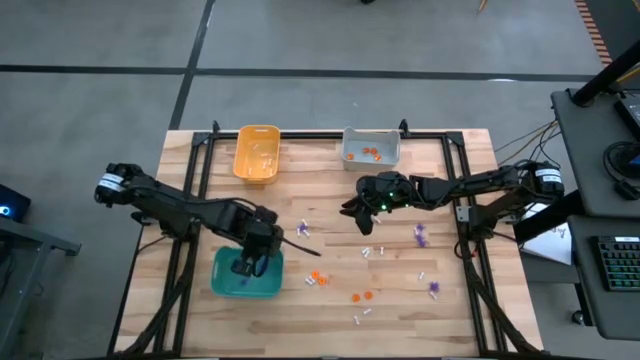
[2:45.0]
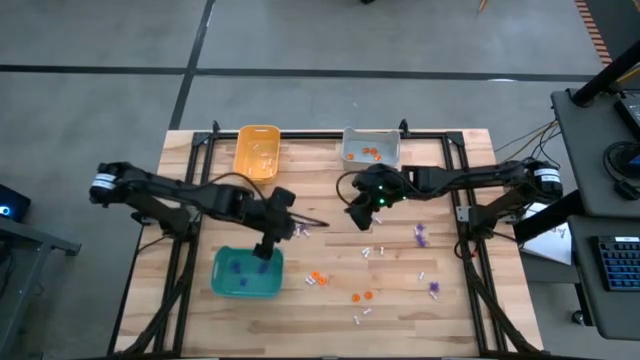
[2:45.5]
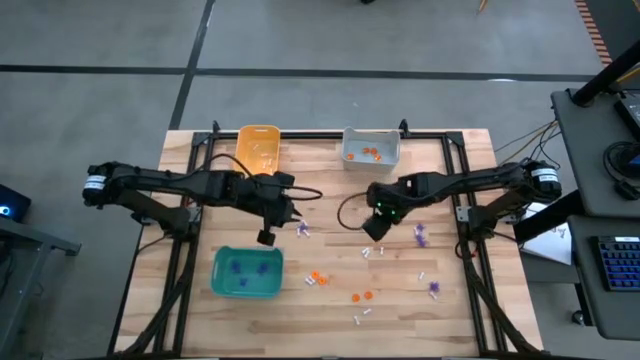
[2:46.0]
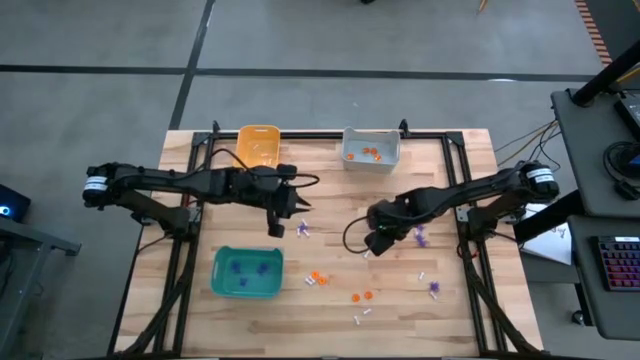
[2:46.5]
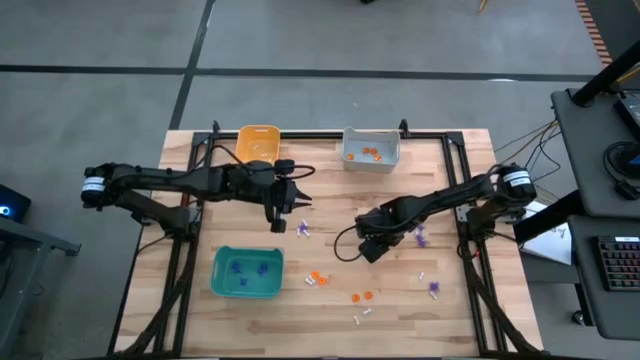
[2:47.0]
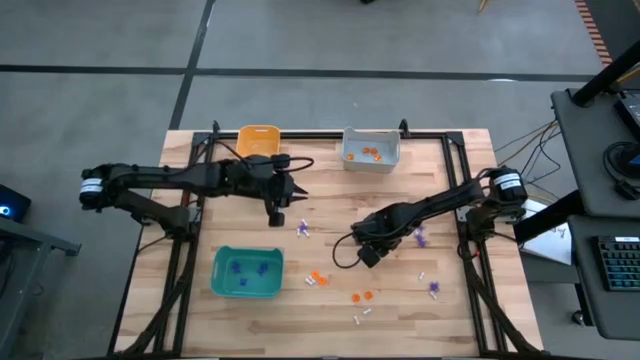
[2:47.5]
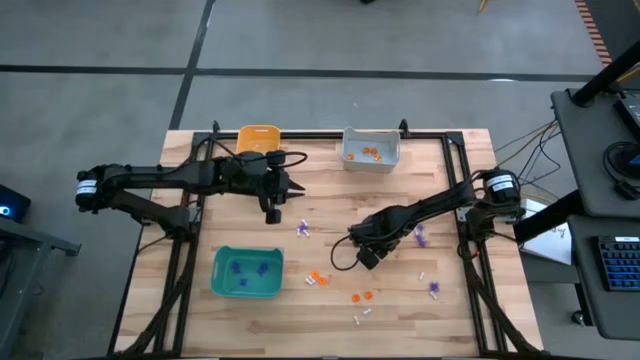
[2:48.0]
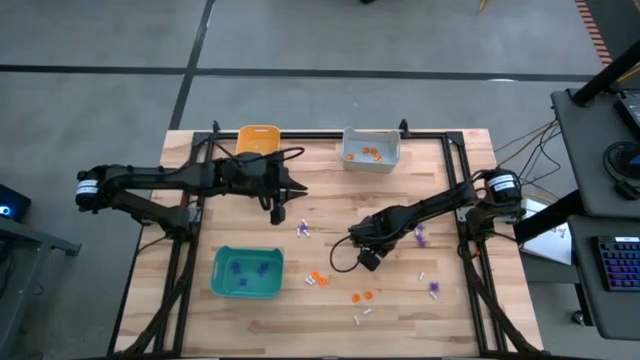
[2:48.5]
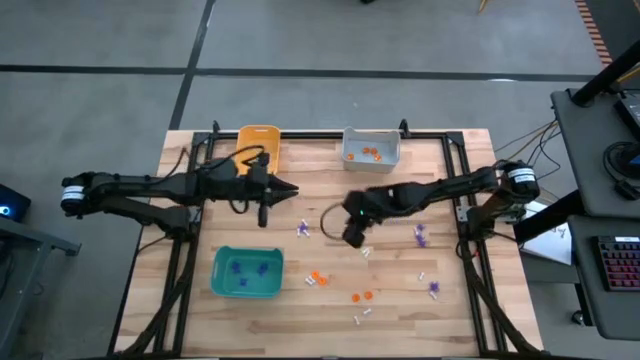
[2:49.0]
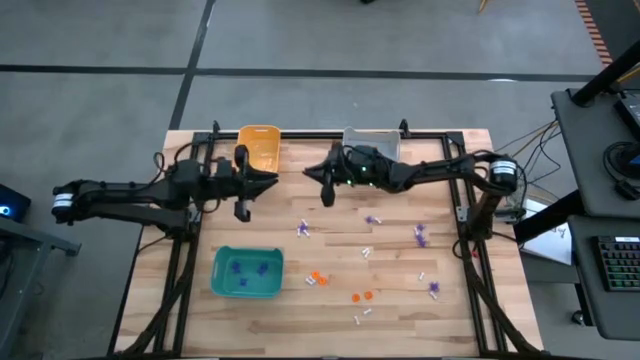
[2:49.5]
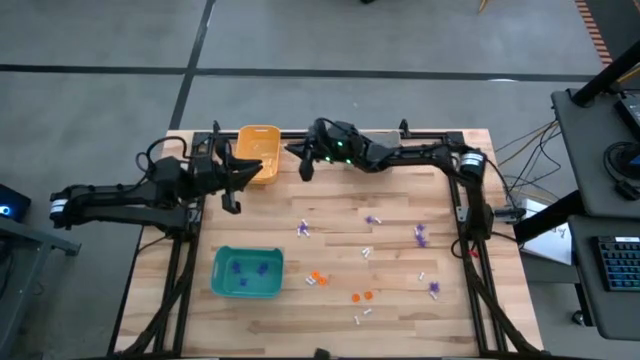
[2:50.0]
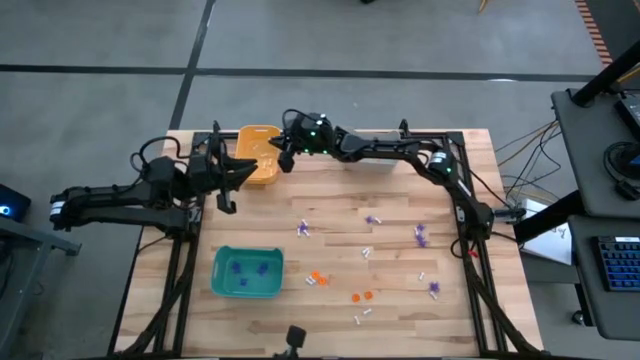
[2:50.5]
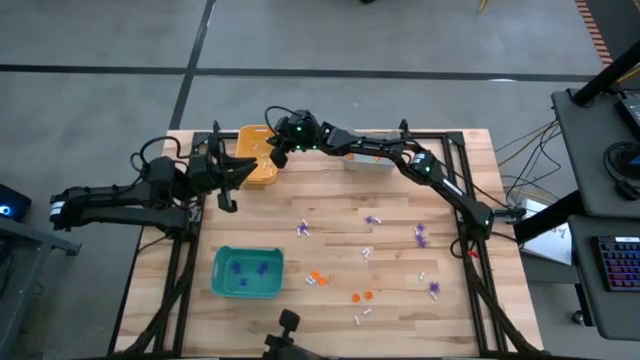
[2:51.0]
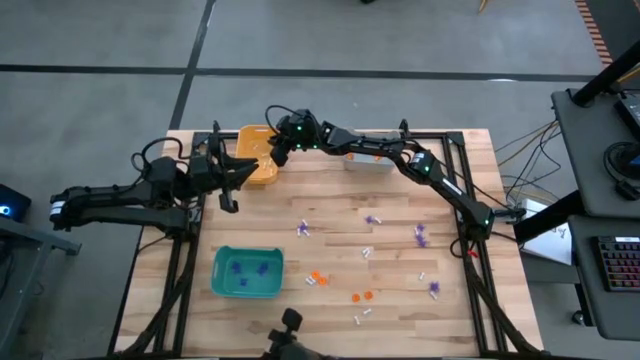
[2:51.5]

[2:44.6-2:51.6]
Task: Sort Halloween decoration
Put the white bone toy into the orange bin

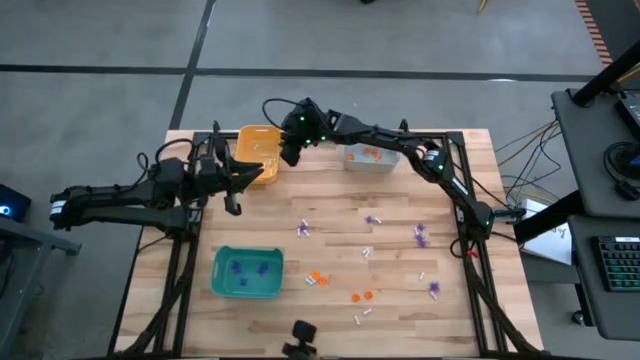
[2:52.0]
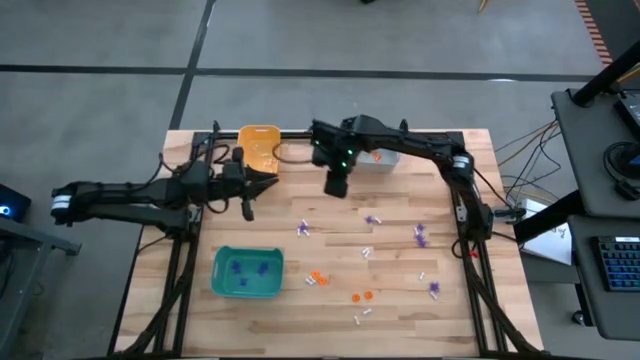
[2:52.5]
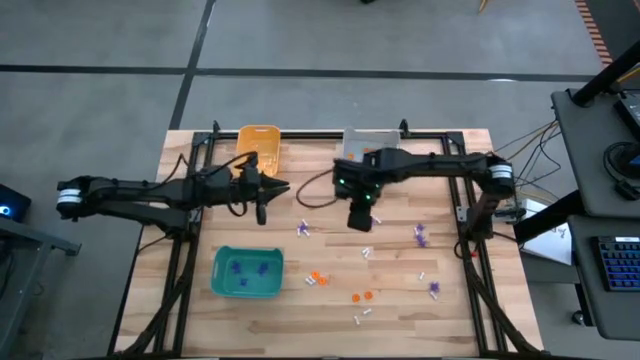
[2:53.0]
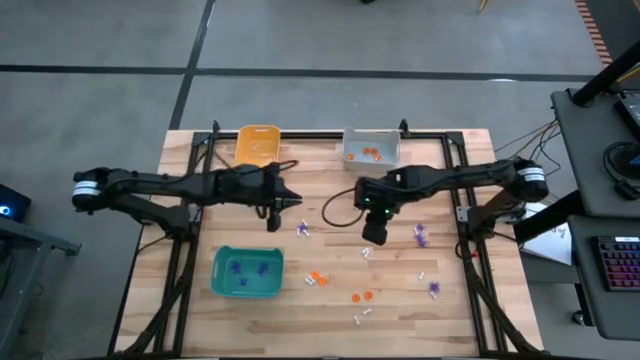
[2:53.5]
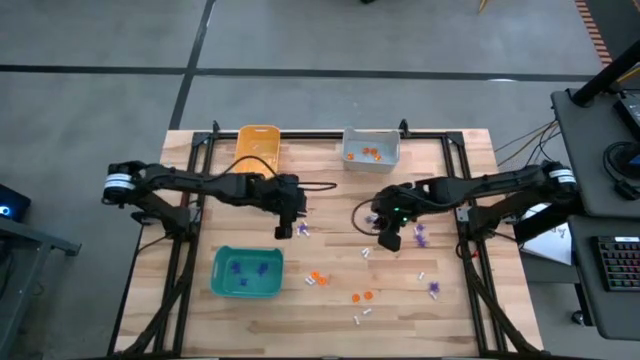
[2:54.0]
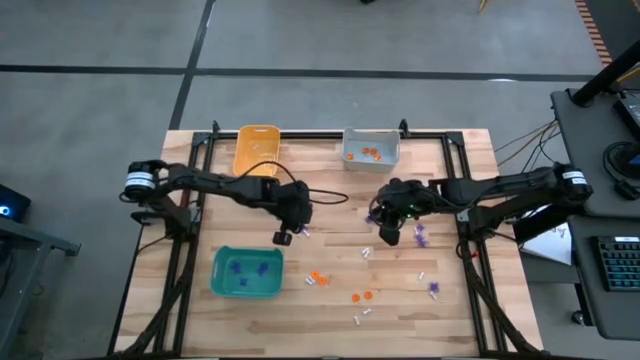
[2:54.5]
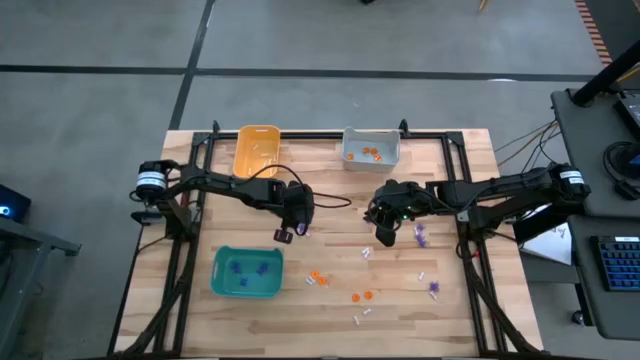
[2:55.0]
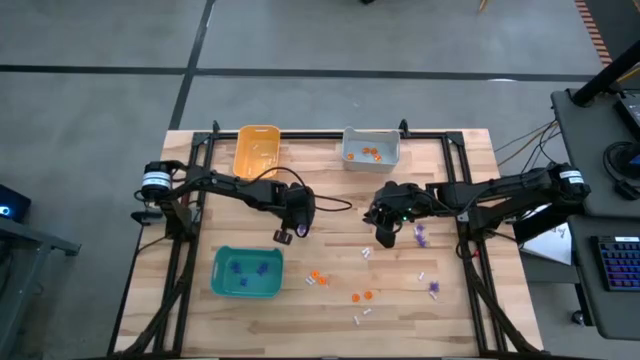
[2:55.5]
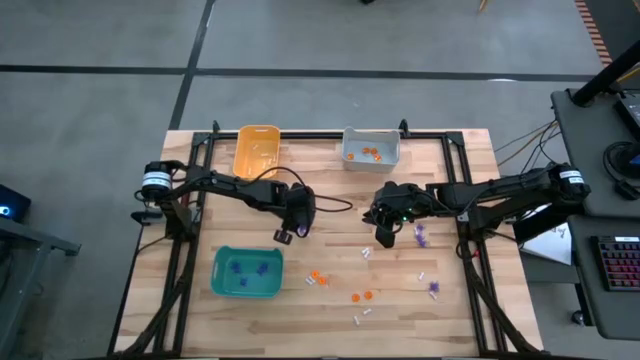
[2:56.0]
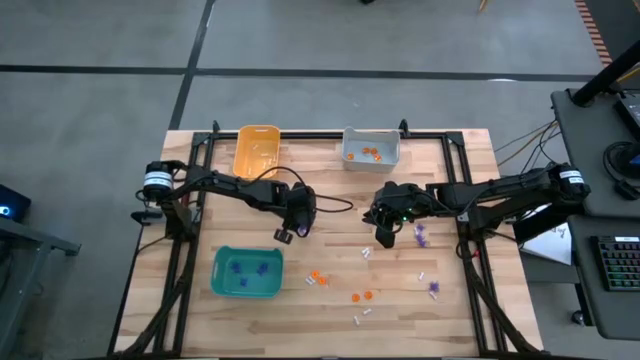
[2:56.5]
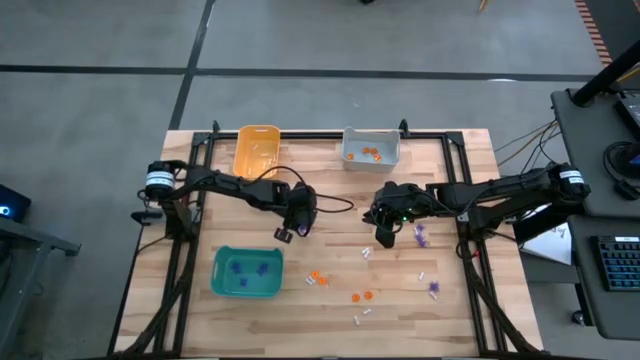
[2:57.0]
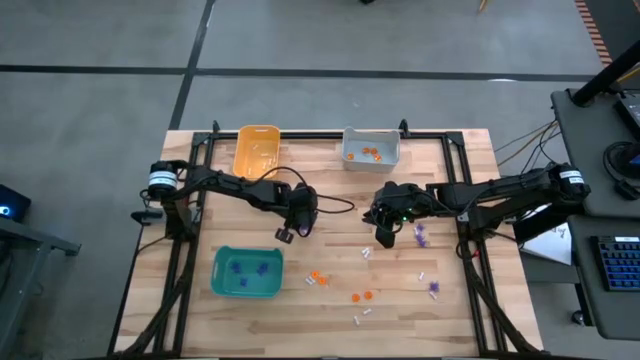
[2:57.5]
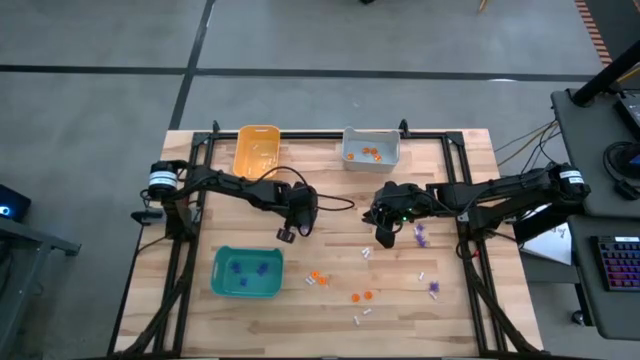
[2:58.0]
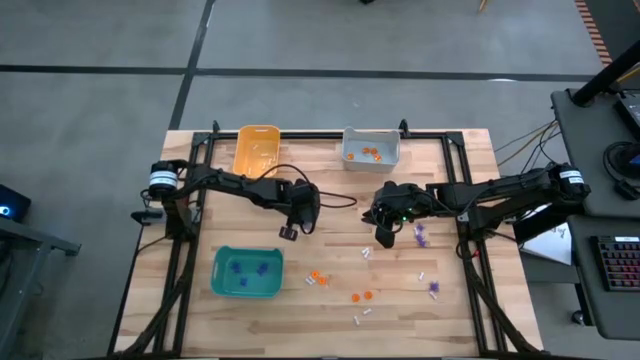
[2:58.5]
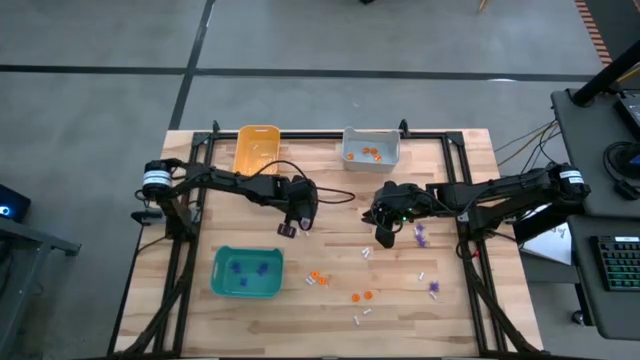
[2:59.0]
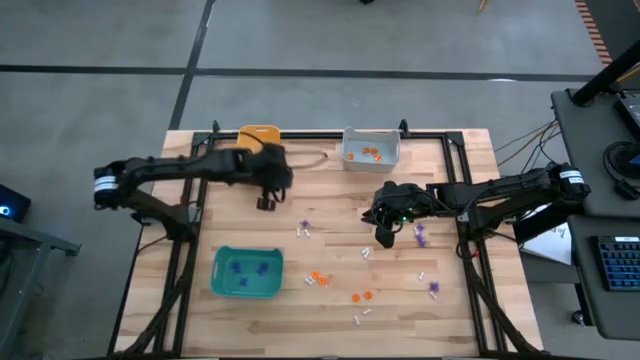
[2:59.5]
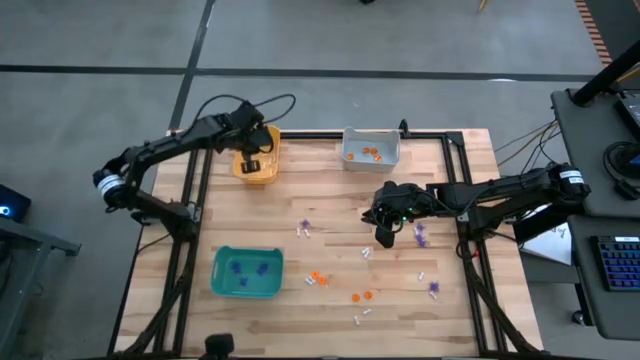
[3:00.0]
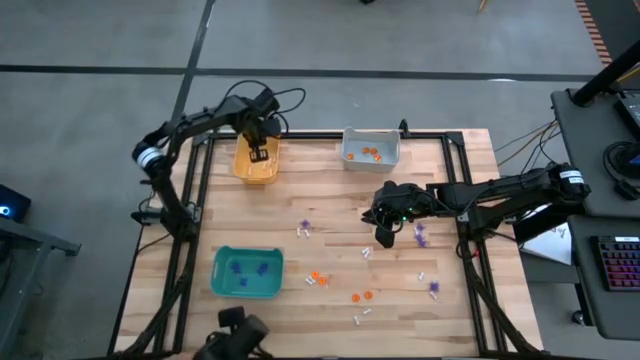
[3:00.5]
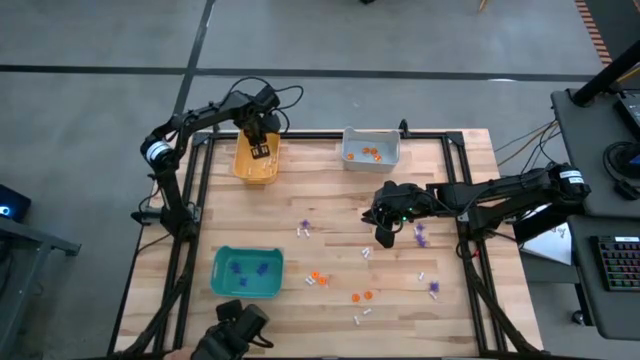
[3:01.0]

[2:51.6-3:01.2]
Put the white bone toy into the orange bin

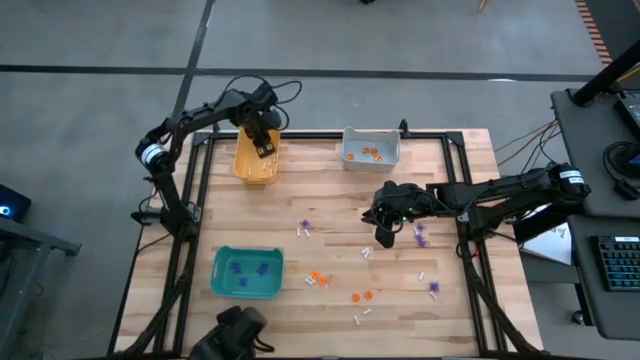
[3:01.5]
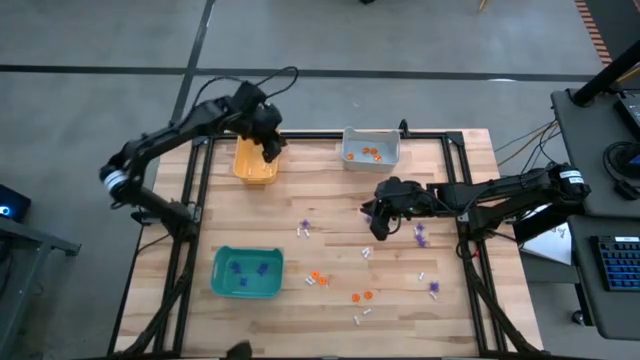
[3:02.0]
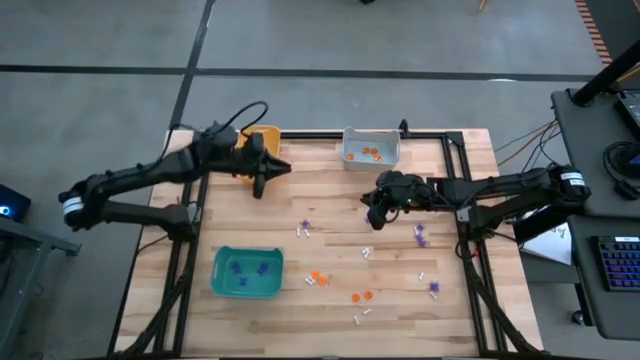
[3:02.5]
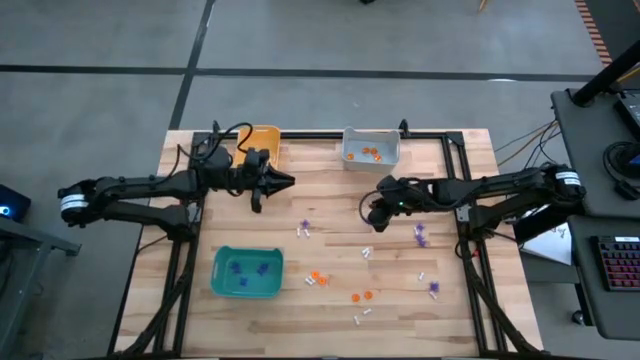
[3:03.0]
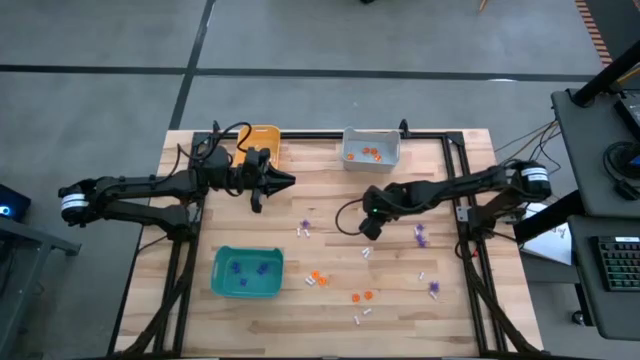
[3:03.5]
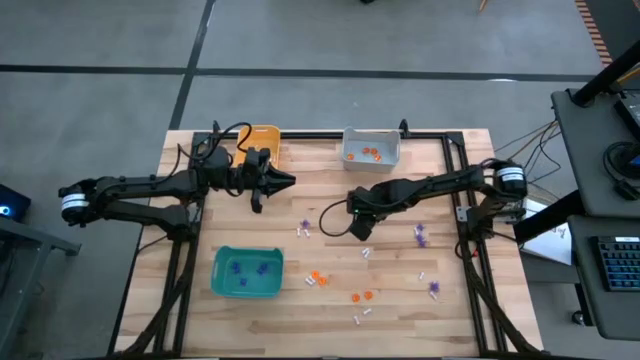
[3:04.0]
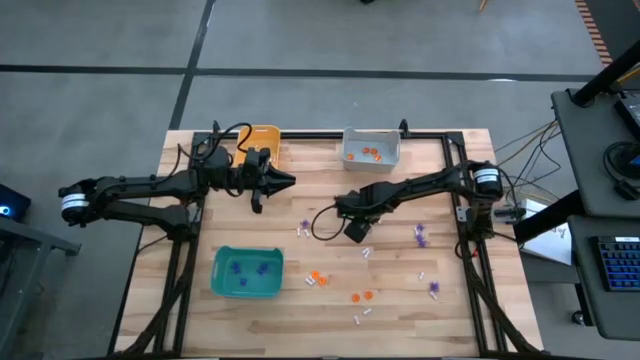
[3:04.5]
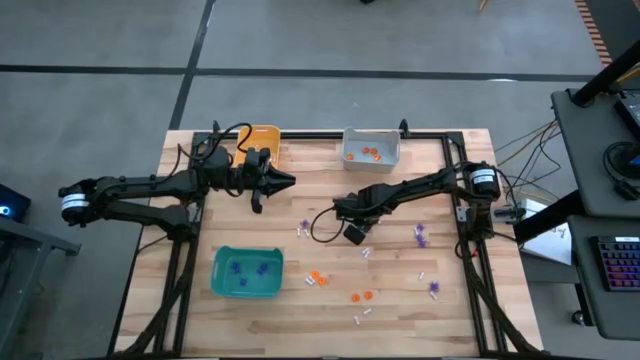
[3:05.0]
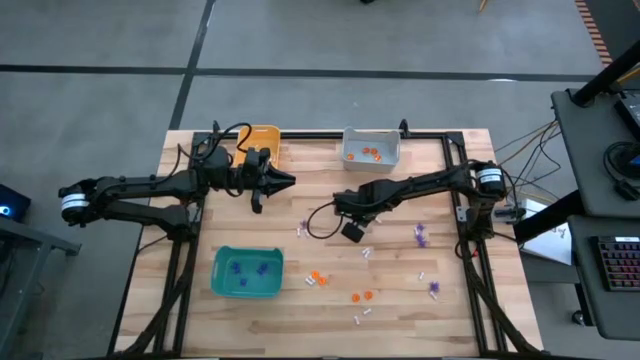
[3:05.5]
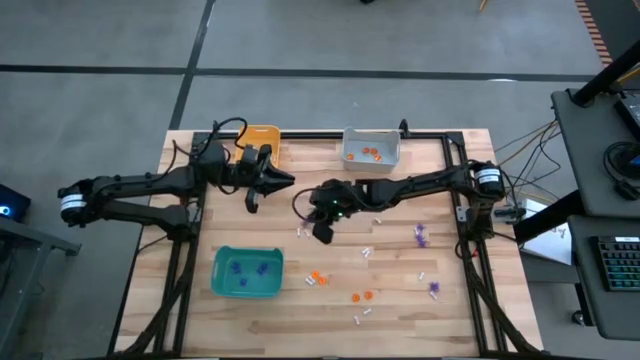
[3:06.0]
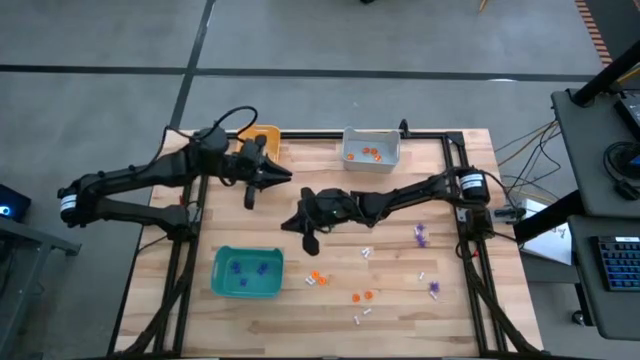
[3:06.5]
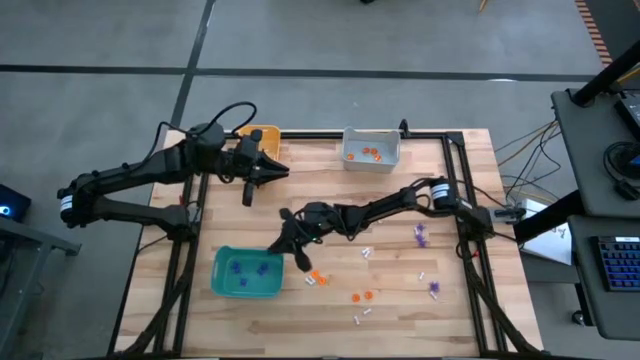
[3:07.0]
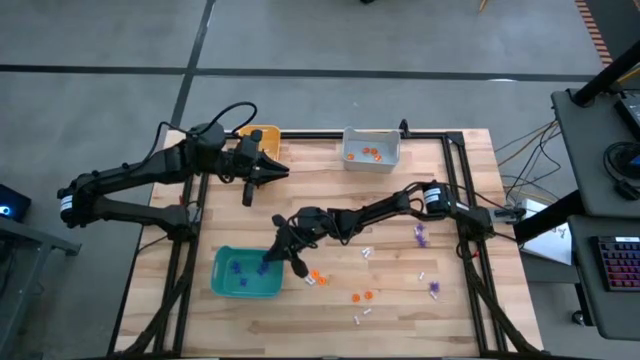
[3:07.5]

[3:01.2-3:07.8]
Put the blue spider toy into the green bin
